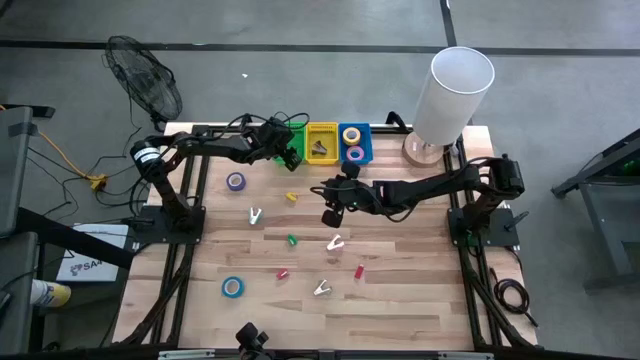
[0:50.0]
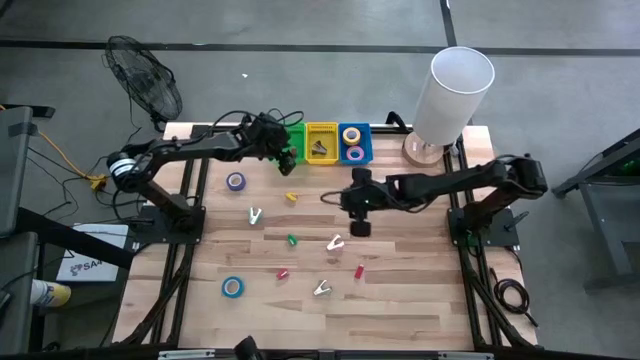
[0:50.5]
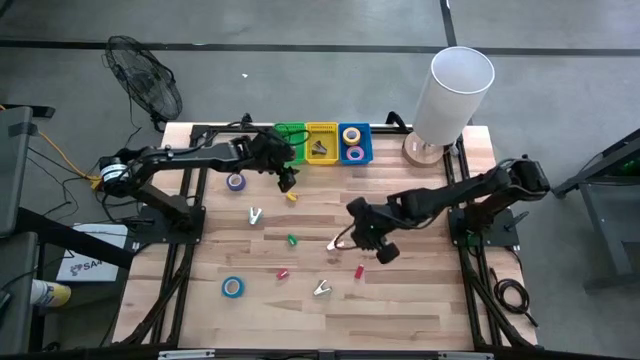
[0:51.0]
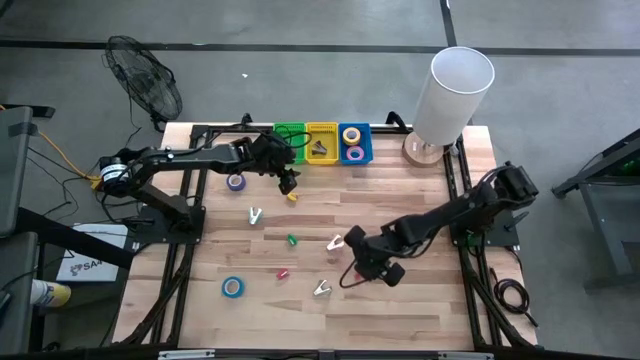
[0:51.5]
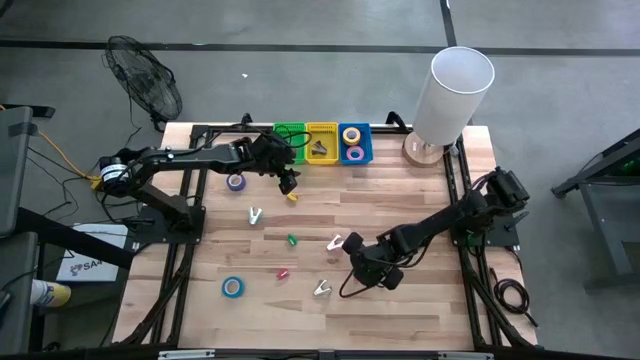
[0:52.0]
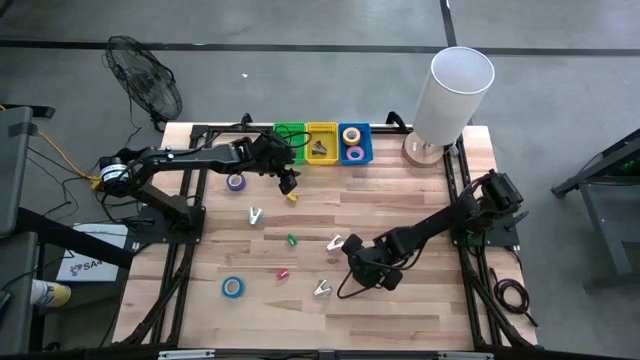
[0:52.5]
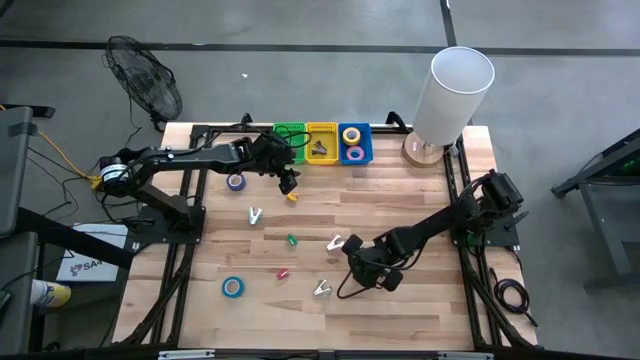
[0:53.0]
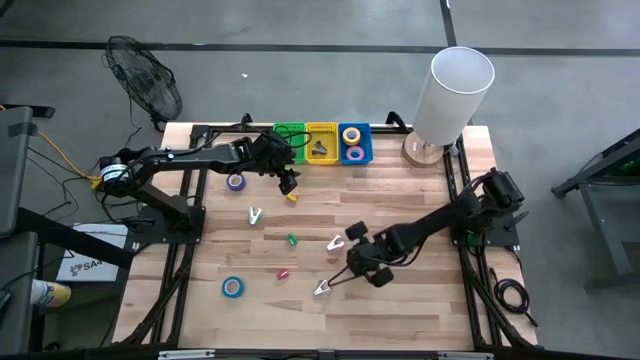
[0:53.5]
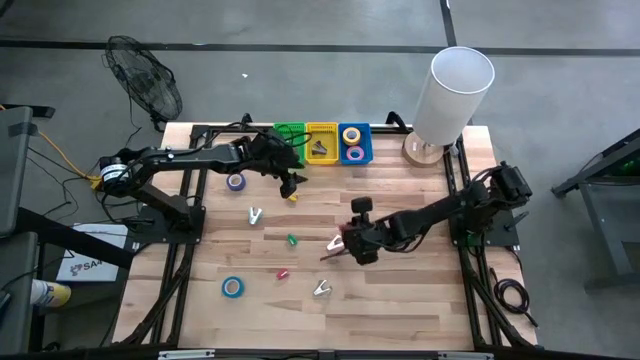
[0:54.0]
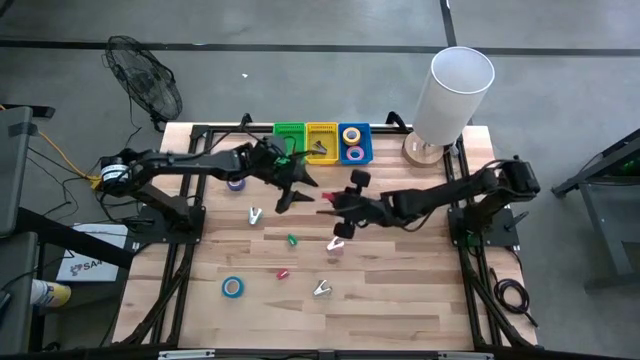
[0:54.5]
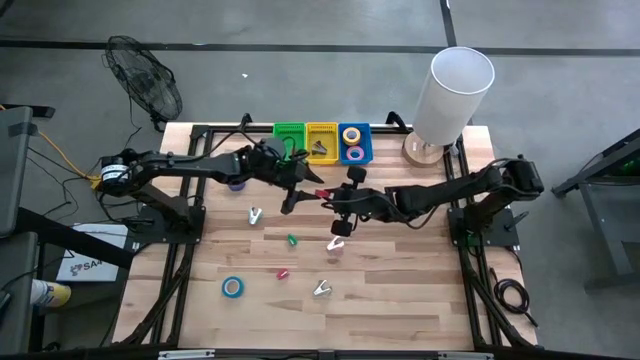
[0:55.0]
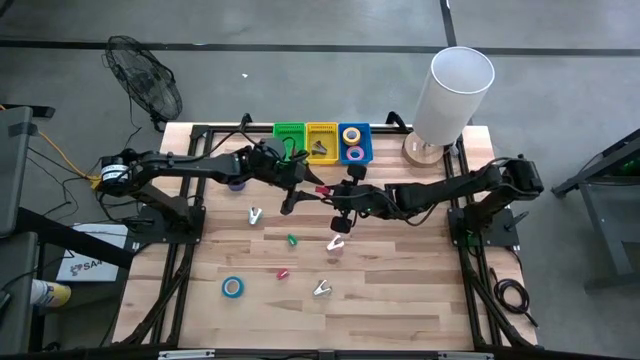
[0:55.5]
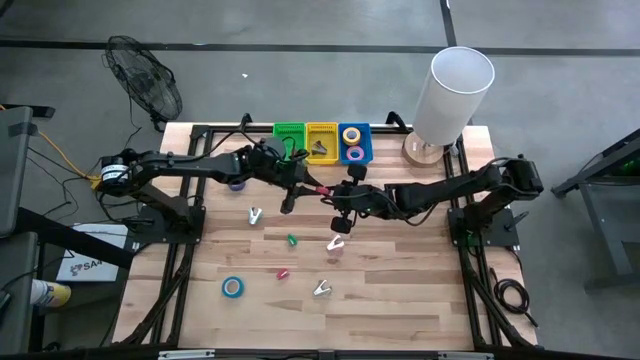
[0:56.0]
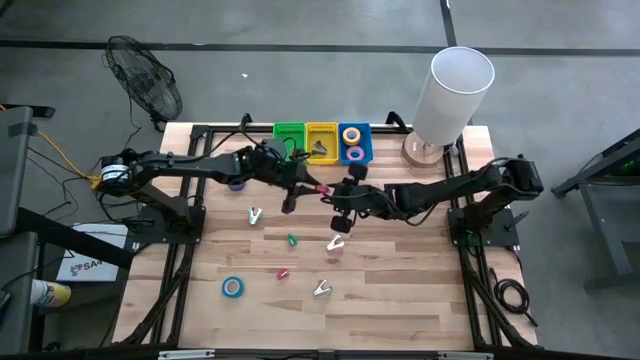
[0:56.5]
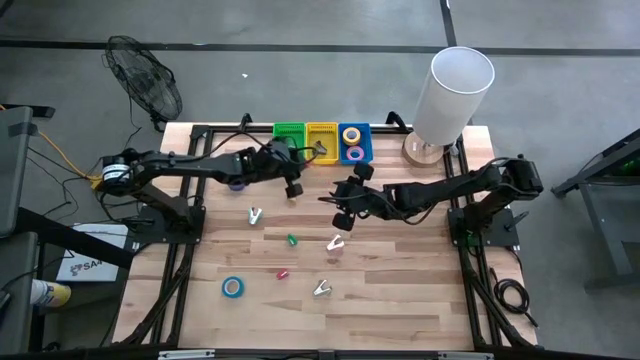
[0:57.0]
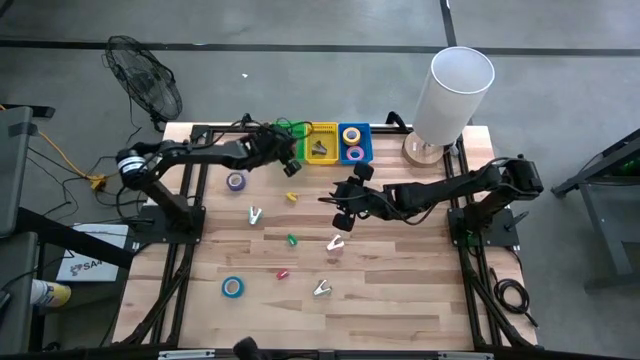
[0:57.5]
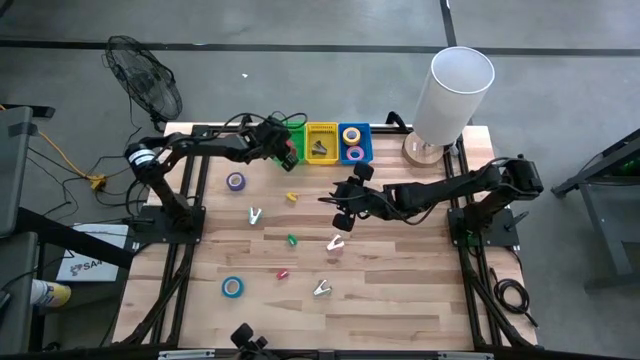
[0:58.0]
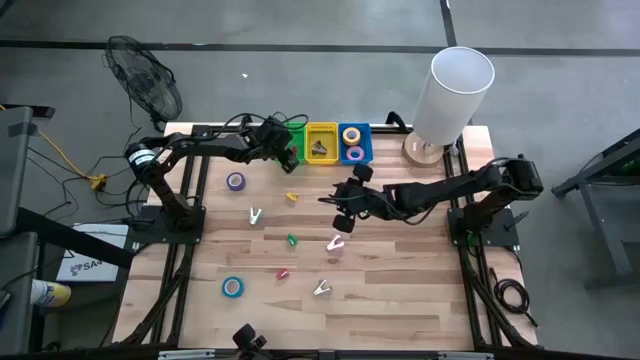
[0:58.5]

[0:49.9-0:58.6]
Task: Pick and place Stapler, Stapler remover, tape
Put the right red stapler into the green bin

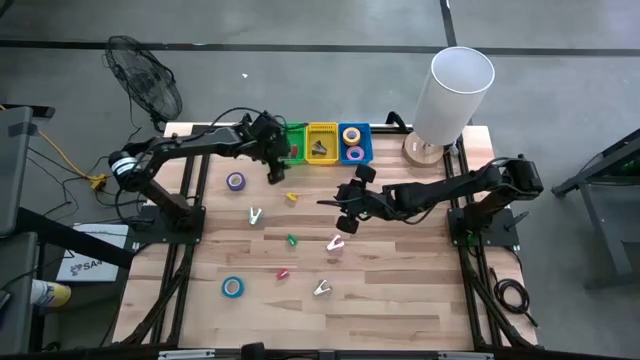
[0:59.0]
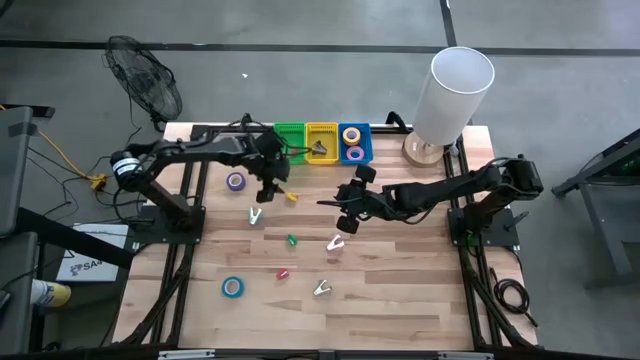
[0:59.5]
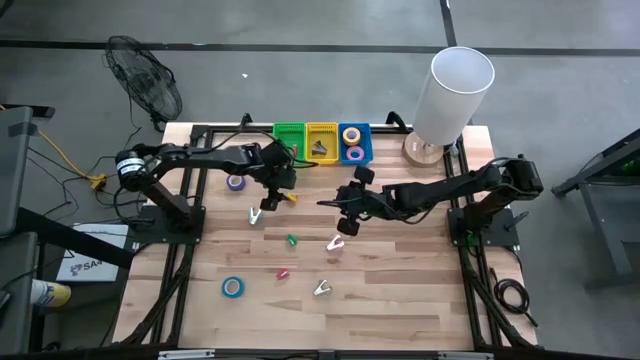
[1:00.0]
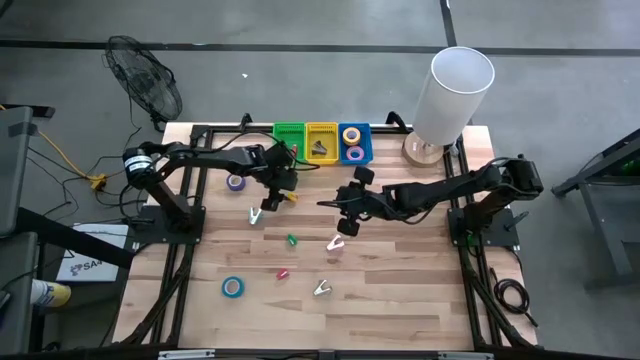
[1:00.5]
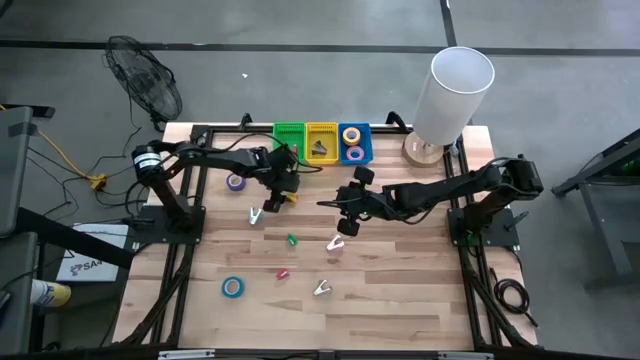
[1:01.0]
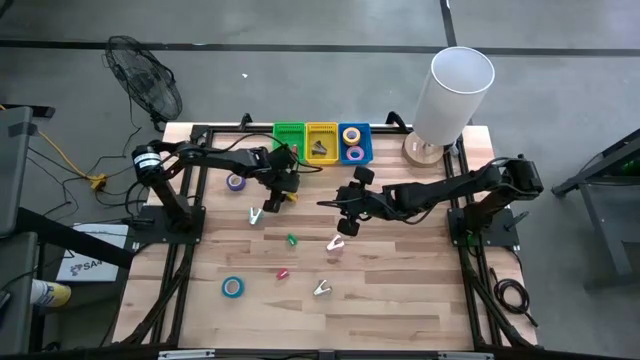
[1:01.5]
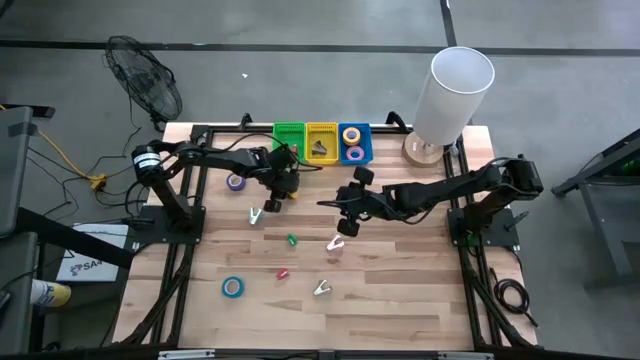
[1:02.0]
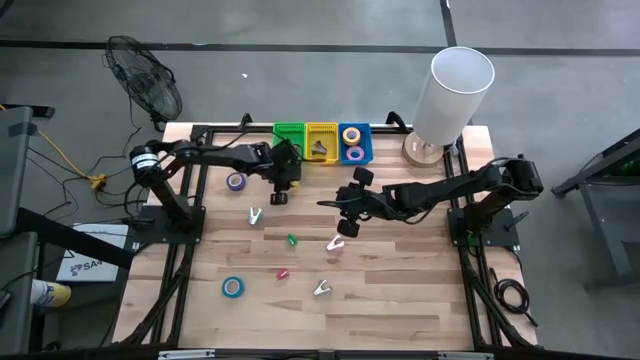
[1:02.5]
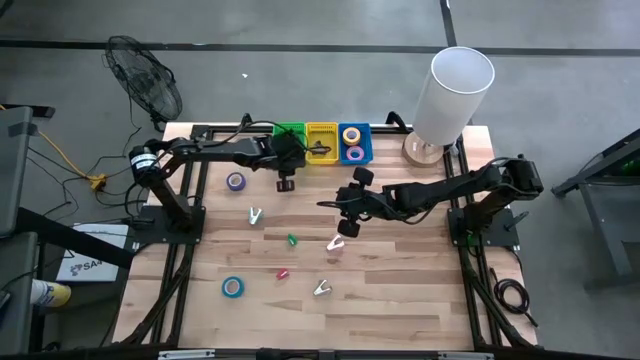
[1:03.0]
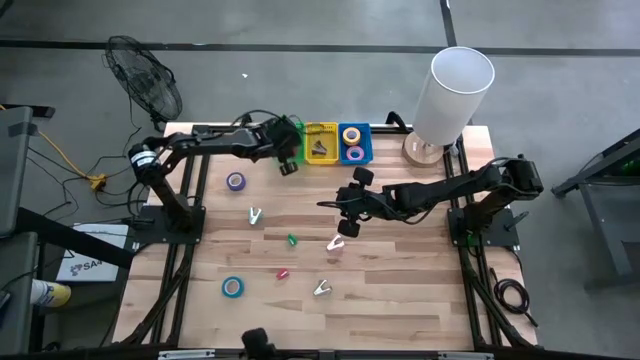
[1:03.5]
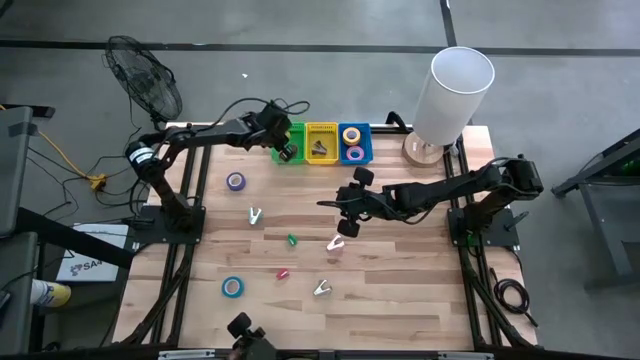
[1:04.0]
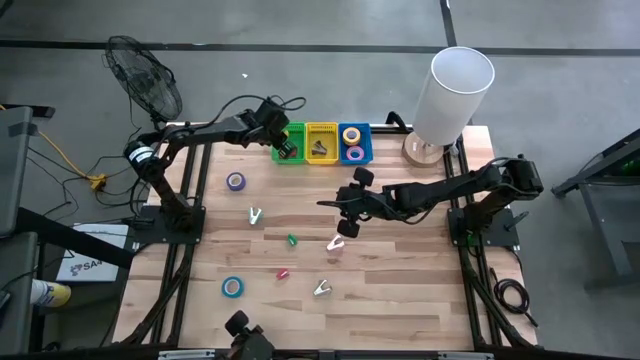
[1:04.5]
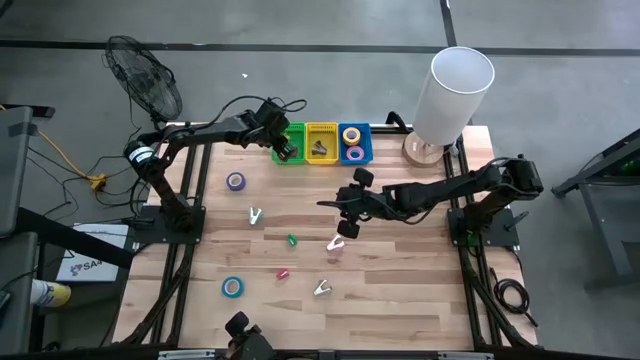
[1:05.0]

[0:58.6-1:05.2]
Put the yellow stapler into the green bin

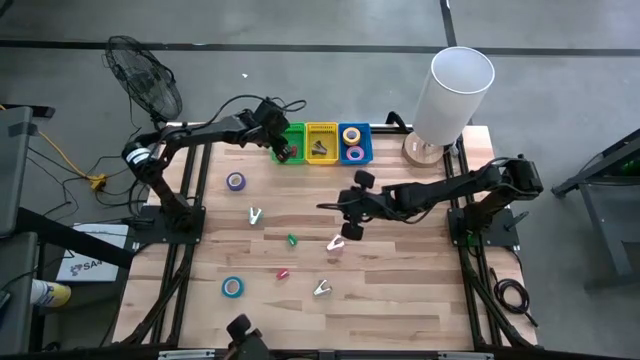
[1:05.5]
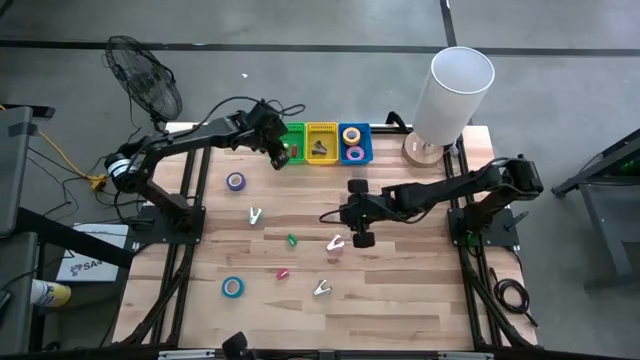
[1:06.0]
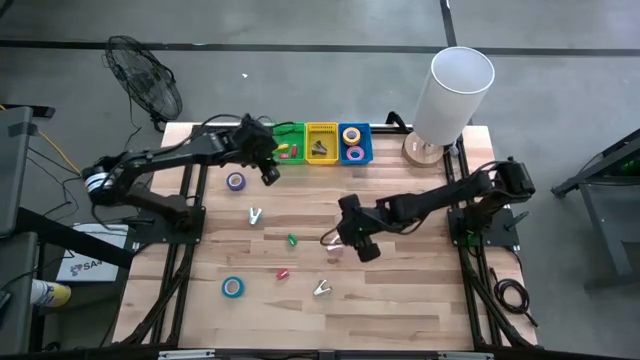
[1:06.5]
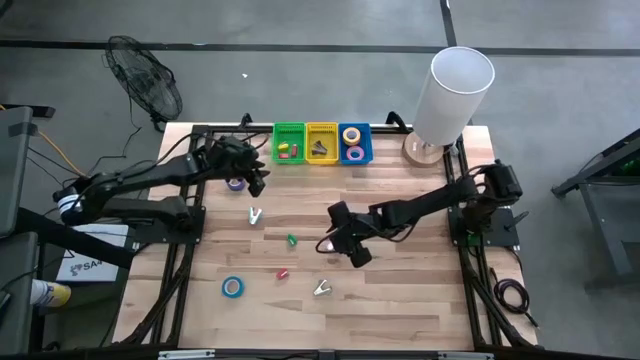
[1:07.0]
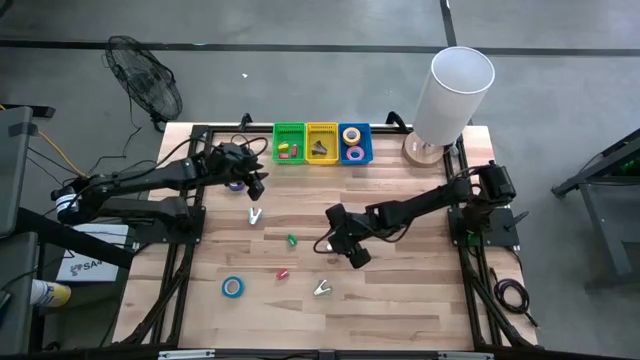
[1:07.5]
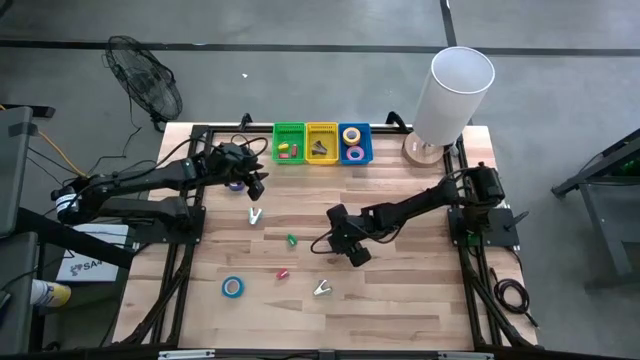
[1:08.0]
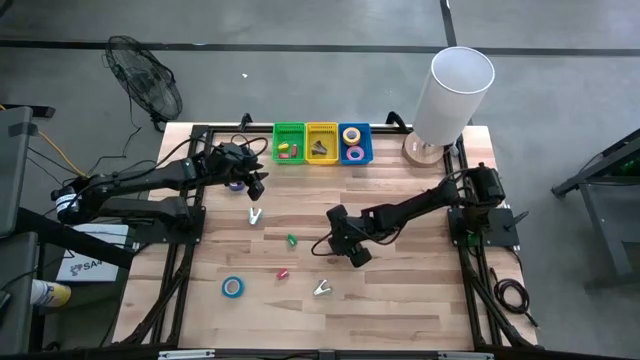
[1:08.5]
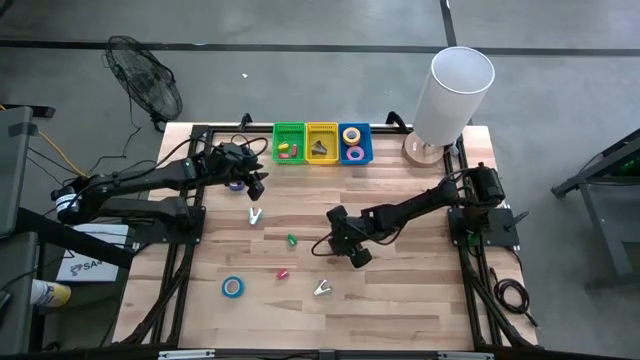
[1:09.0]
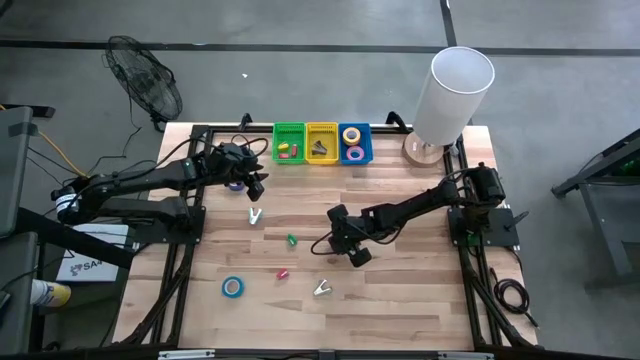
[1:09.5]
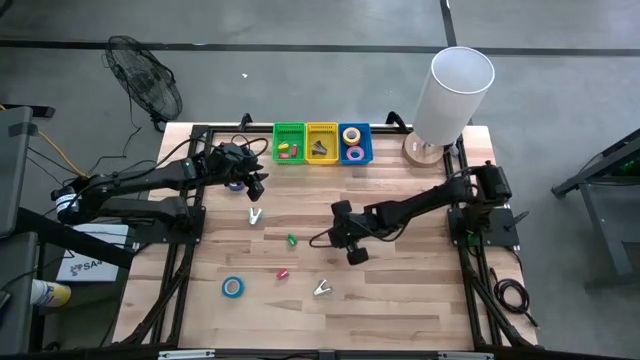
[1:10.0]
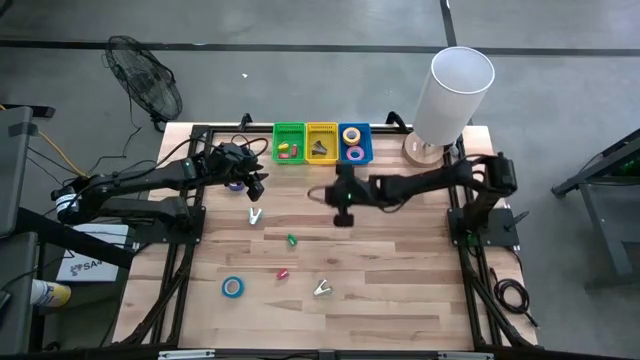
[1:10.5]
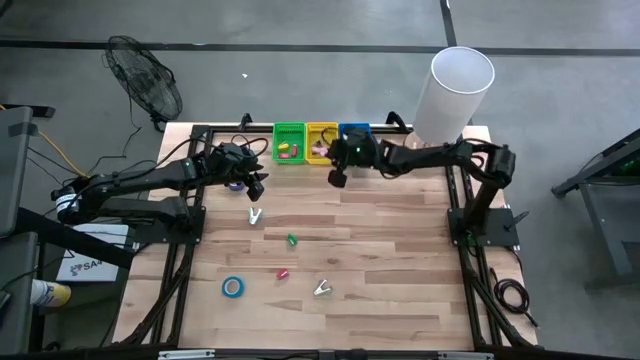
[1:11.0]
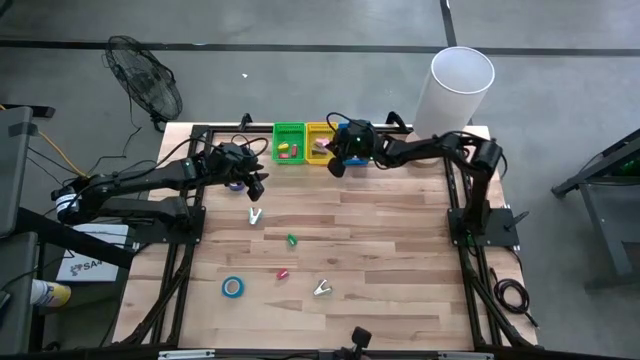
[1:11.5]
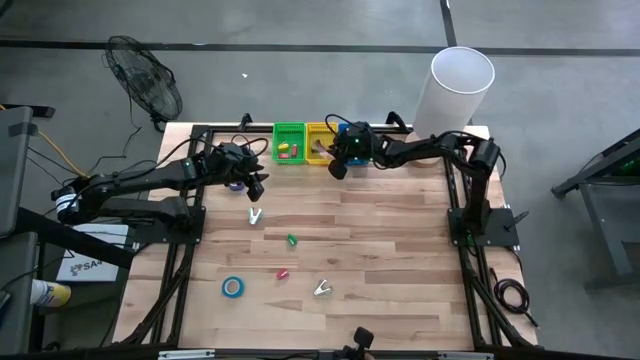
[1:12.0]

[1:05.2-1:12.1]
Put the pink staple remover into the yellow bin
